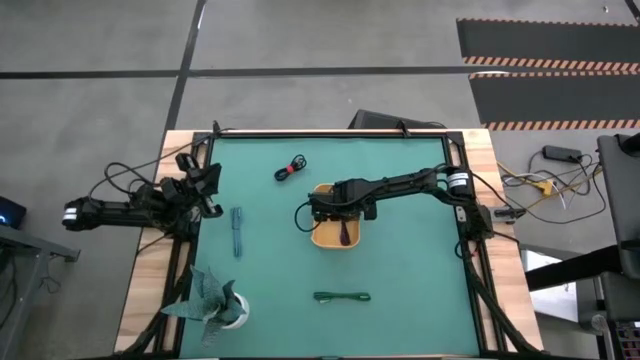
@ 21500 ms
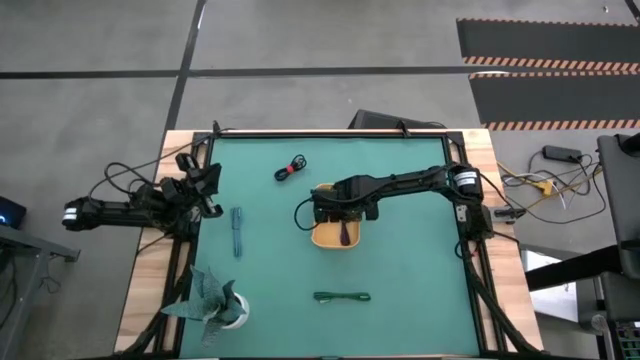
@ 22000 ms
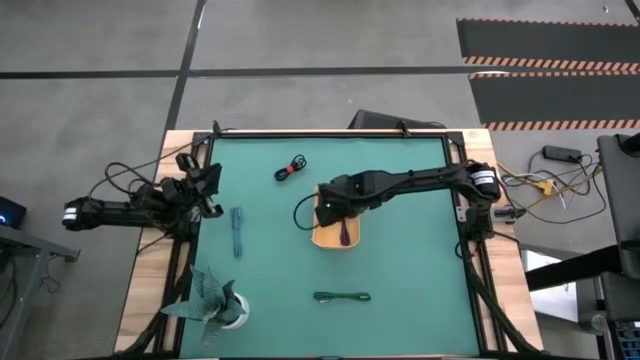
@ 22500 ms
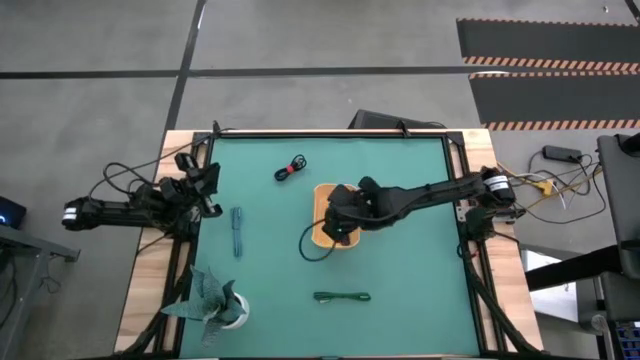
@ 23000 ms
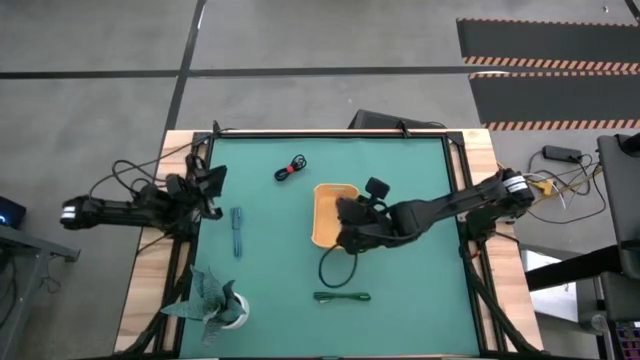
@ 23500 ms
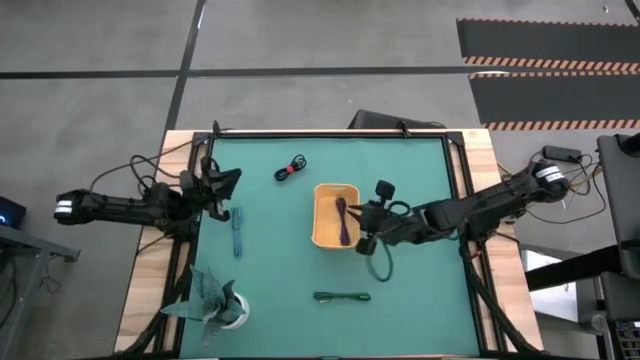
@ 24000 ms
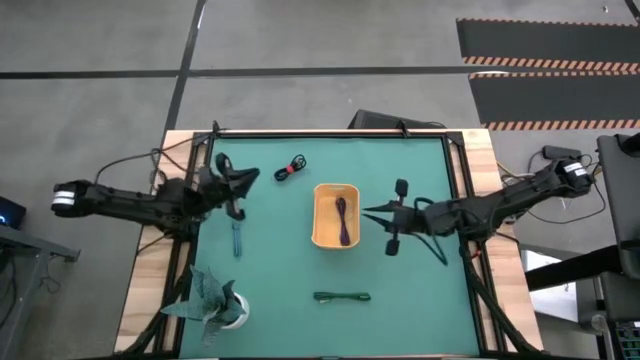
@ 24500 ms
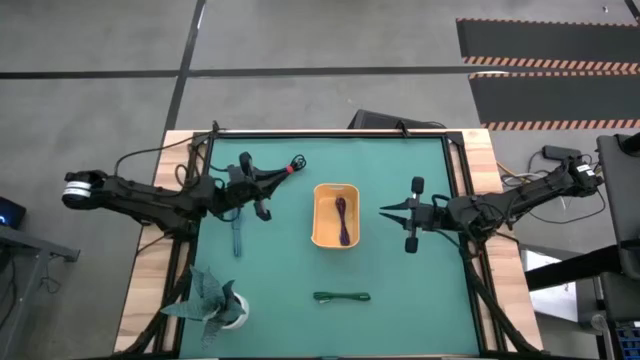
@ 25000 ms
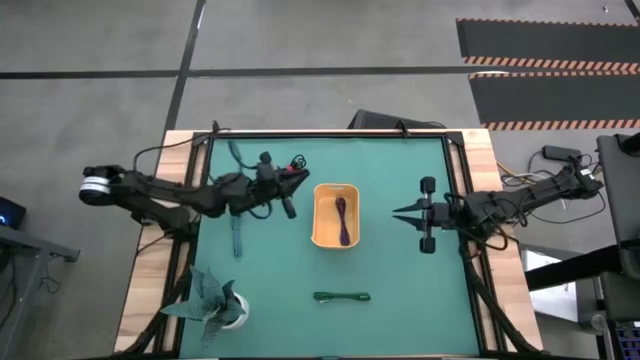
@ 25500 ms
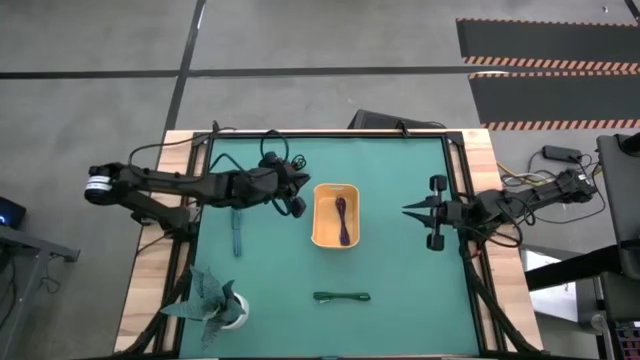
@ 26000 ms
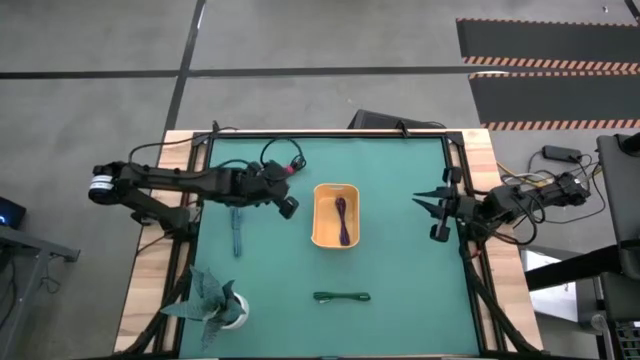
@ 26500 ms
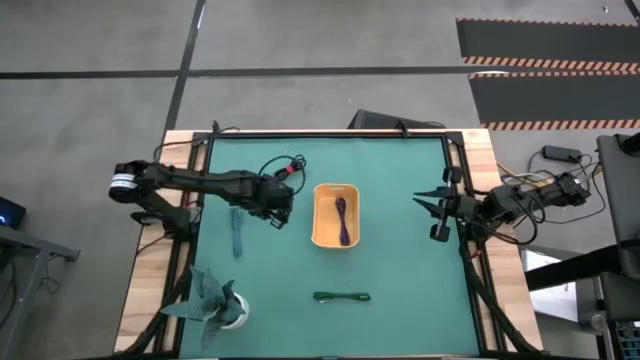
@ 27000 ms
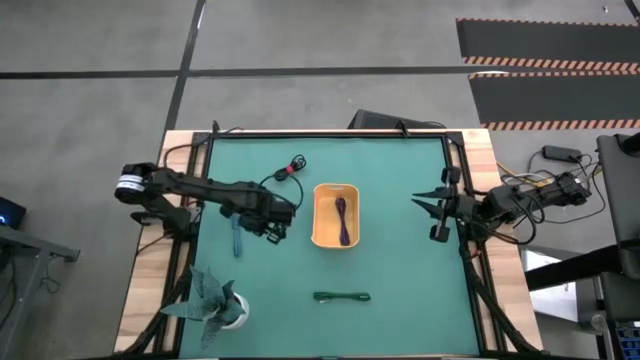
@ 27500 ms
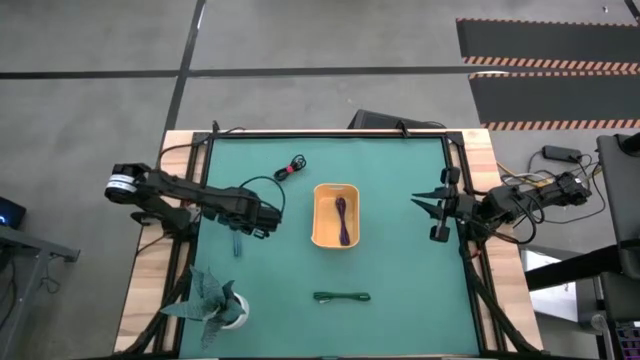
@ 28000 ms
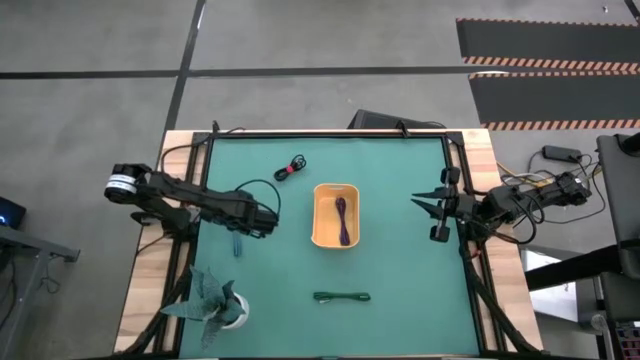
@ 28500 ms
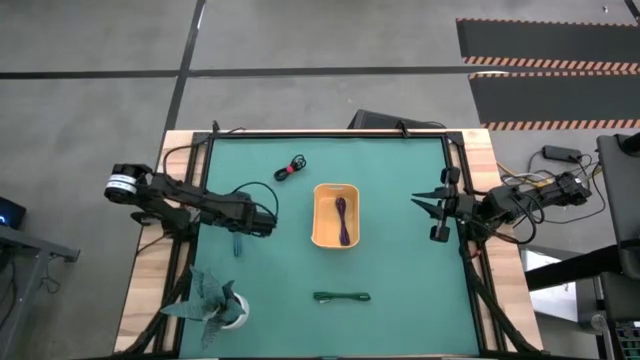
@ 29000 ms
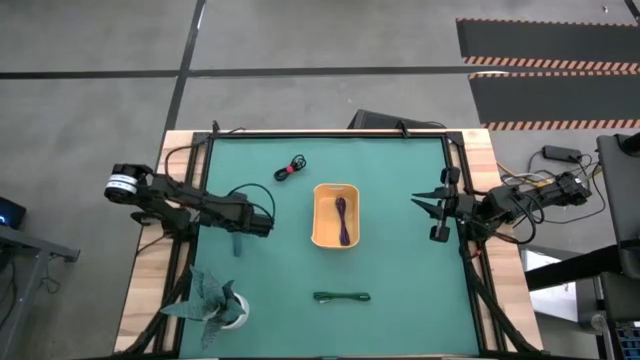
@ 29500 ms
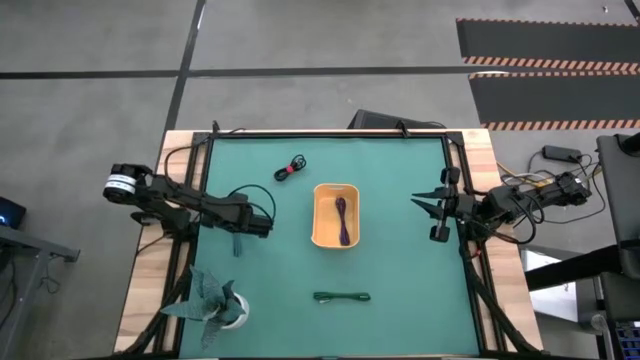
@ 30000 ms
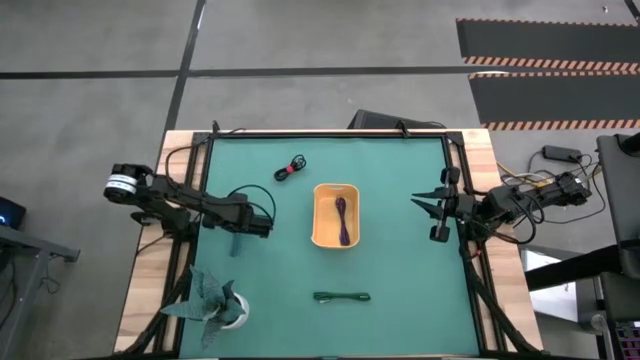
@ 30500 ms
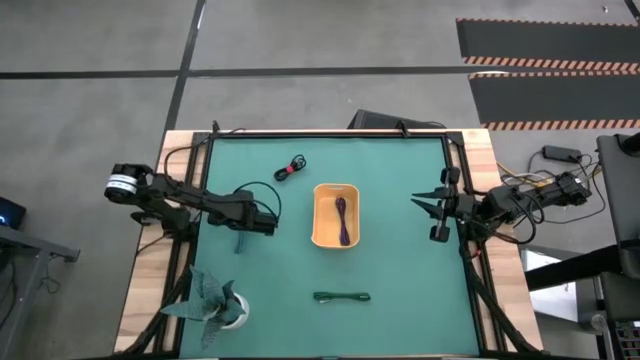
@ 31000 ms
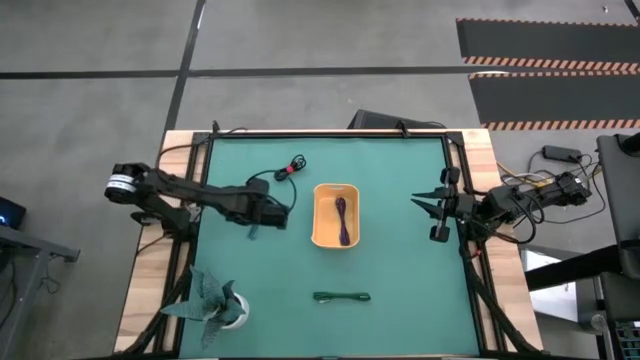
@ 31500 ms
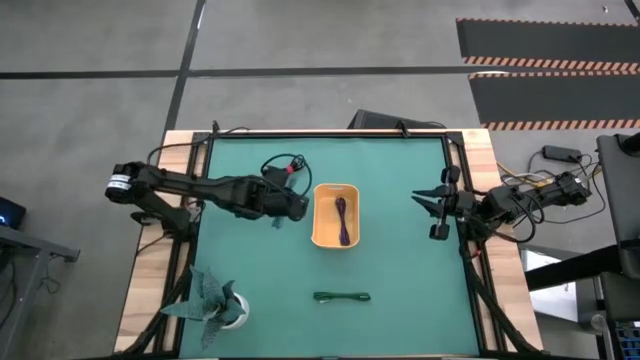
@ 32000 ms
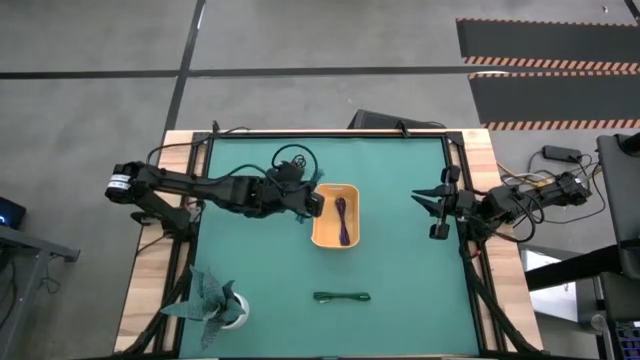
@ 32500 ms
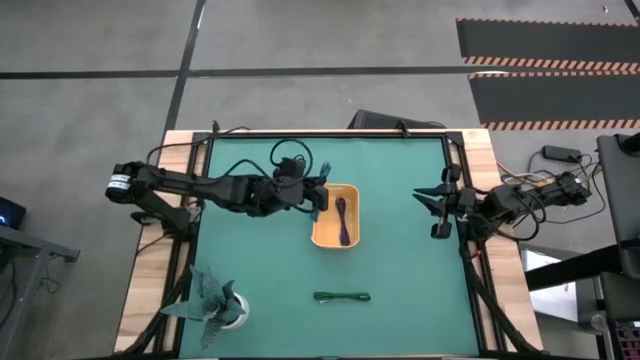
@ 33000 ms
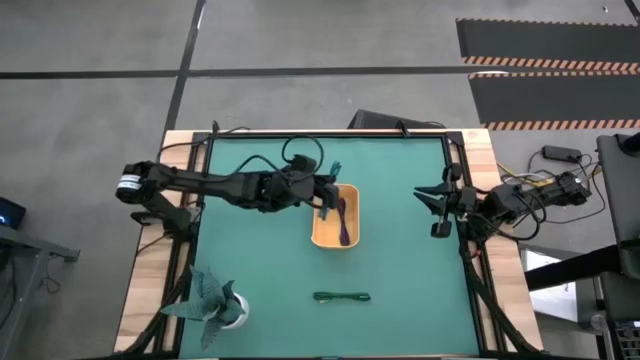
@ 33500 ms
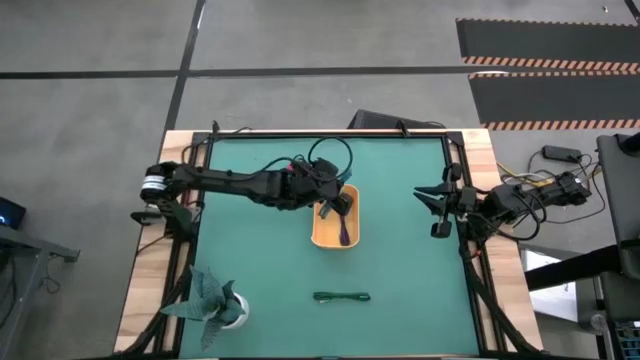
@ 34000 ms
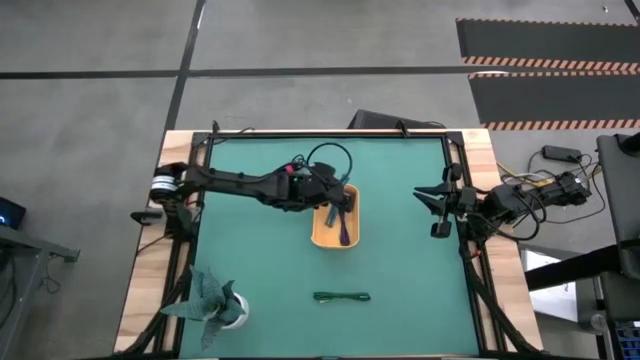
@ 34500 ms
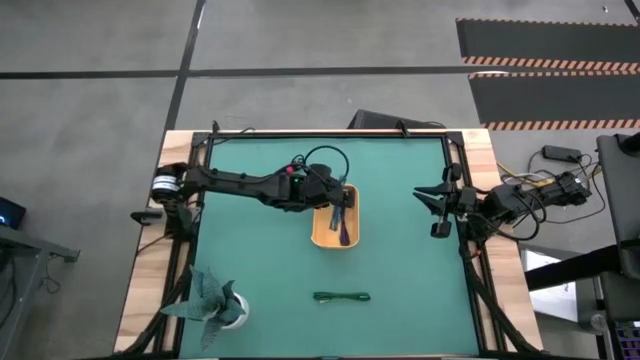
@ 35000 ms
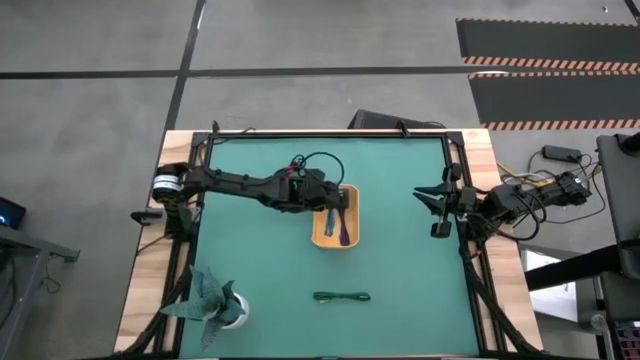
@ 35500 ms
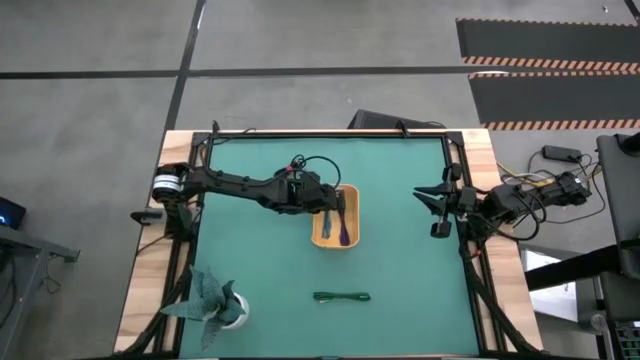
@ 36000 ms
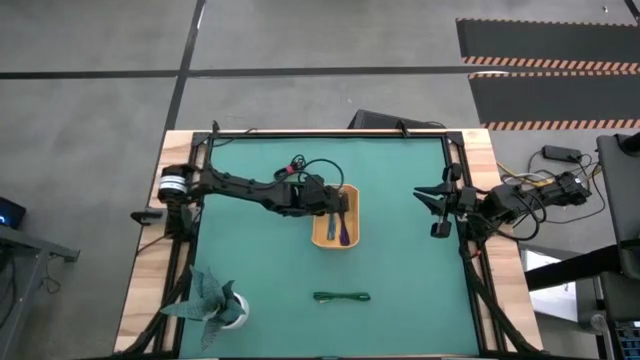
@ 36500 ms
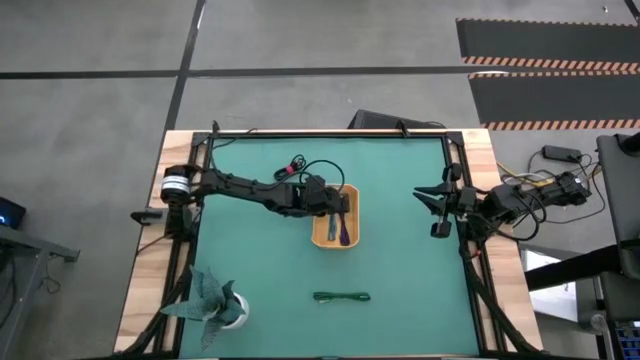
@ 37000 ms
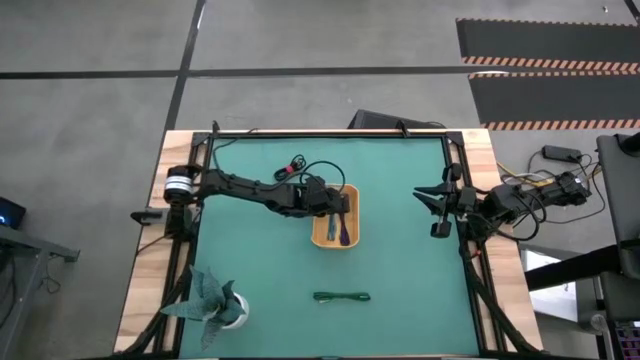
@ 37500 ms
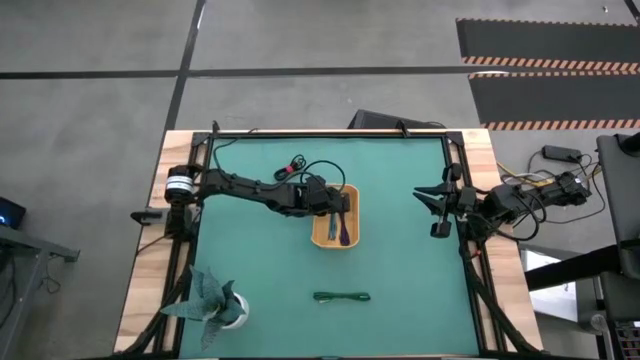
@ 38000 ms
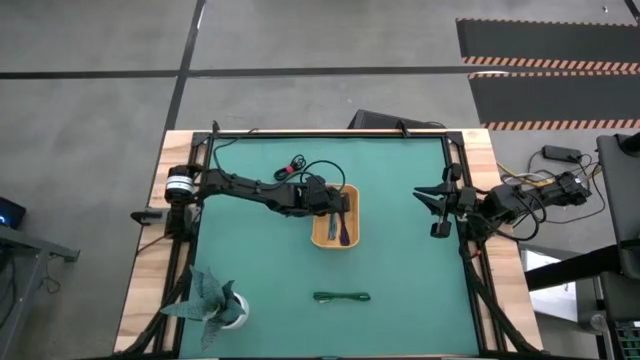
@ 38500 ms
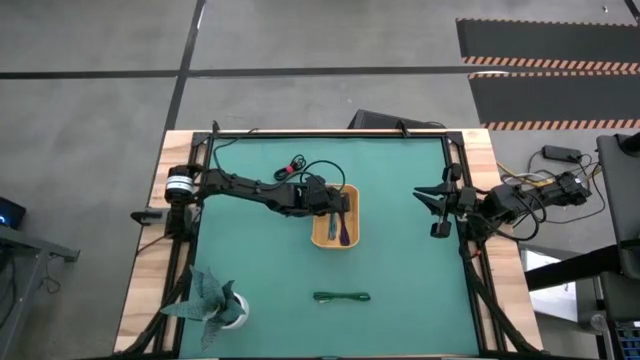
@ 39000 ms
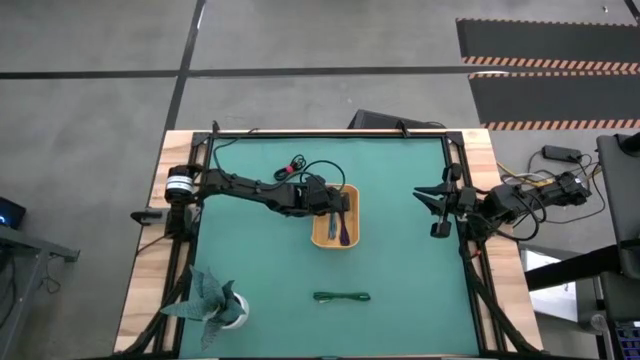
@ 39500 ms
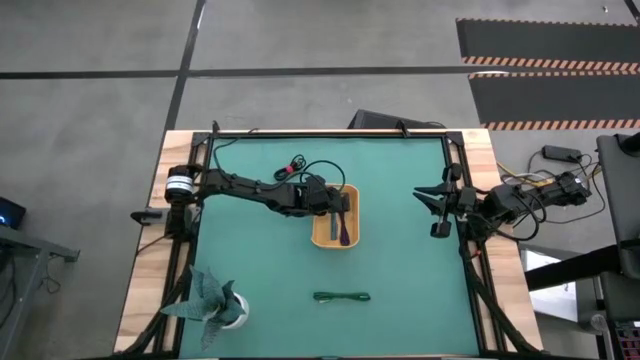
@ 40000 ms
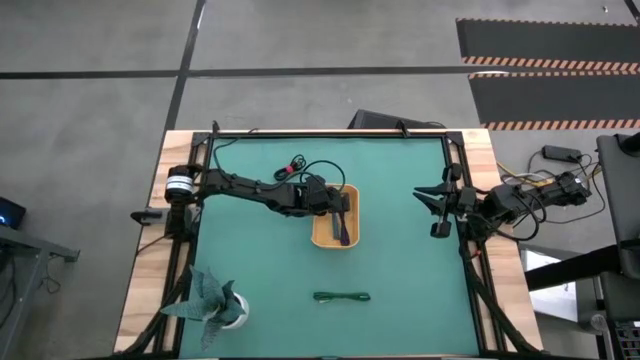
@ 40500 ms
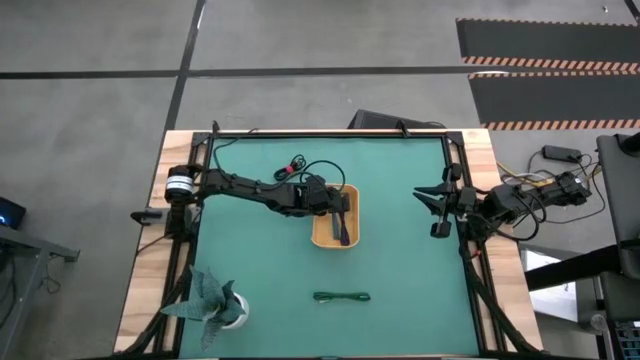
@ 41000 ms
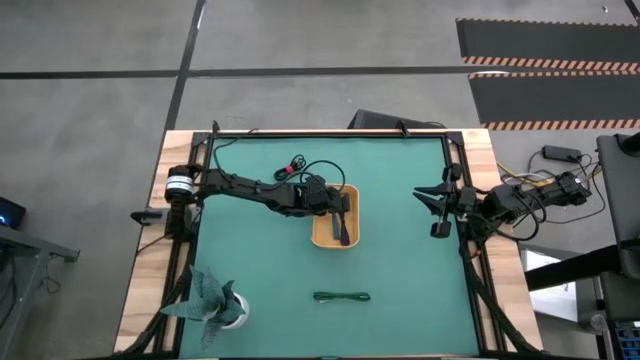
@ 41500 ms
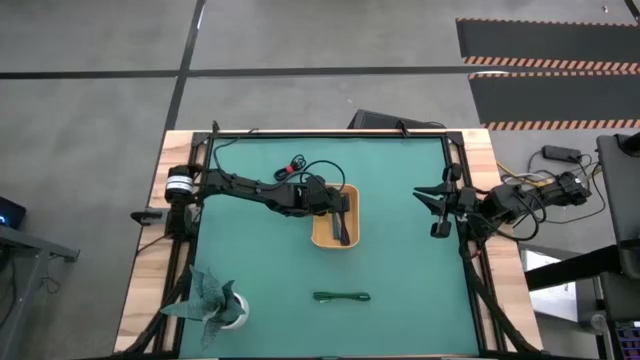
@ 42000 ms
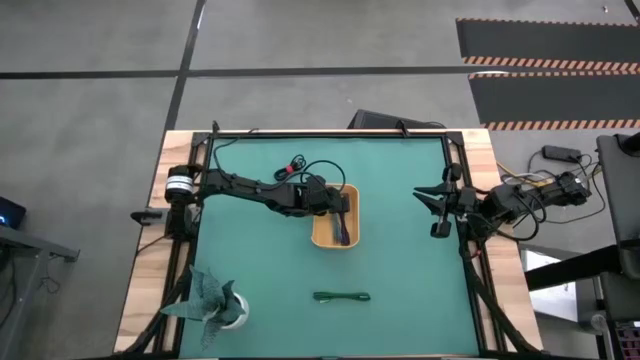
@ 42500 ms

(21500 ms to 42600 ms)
Task: Pick and place USB-C Cables
Put the light blue charger cable into the yellow bin
